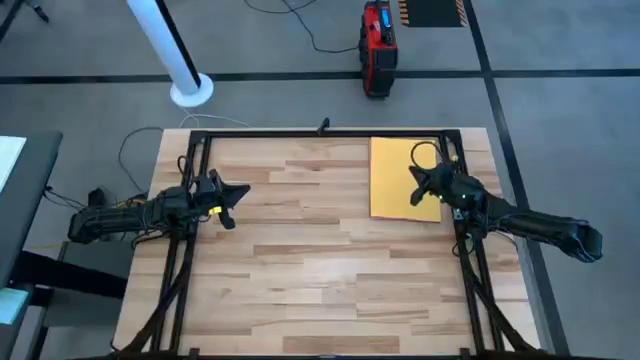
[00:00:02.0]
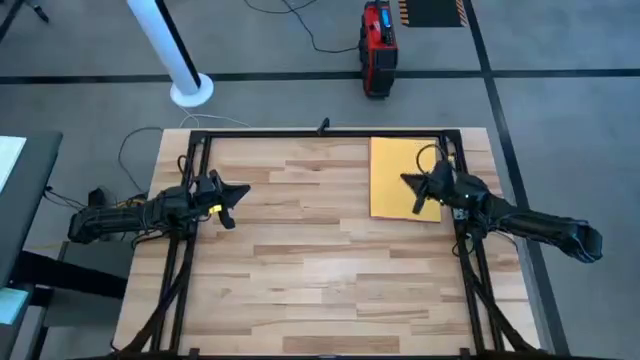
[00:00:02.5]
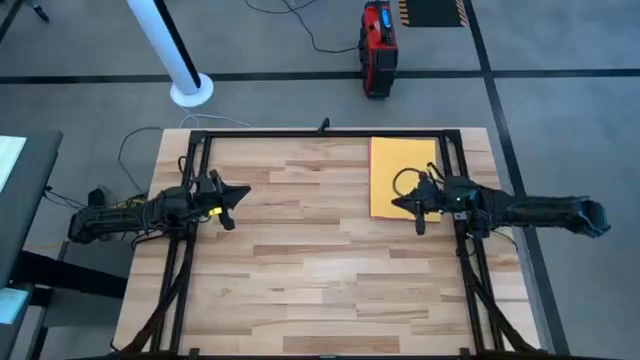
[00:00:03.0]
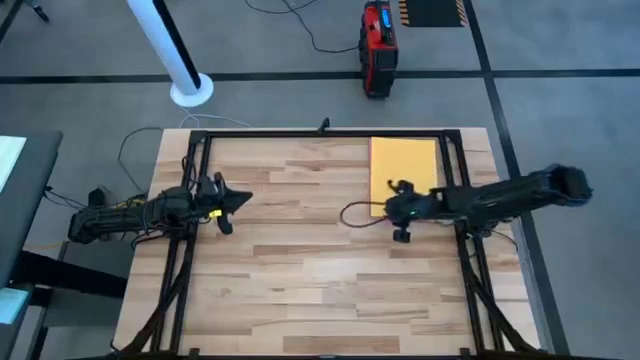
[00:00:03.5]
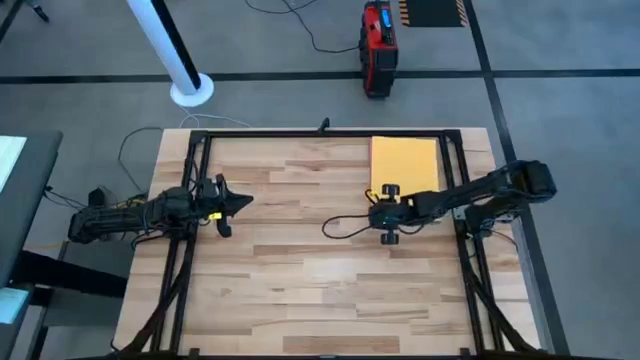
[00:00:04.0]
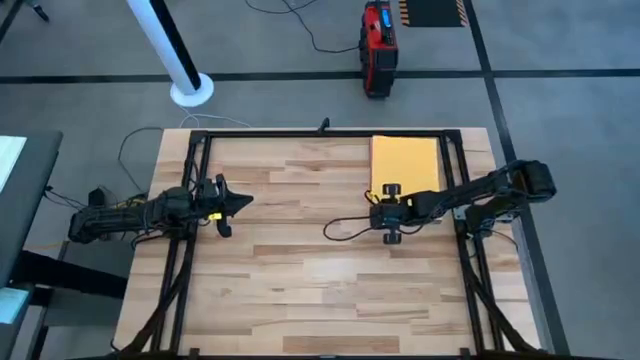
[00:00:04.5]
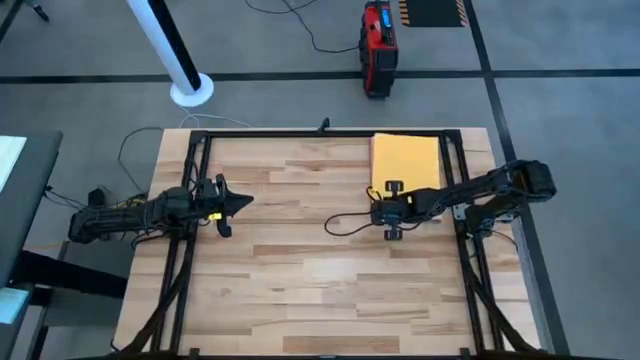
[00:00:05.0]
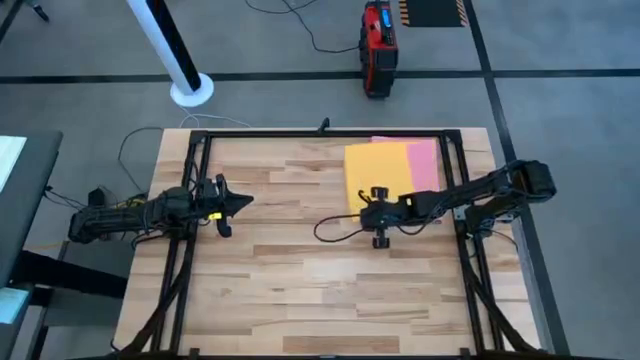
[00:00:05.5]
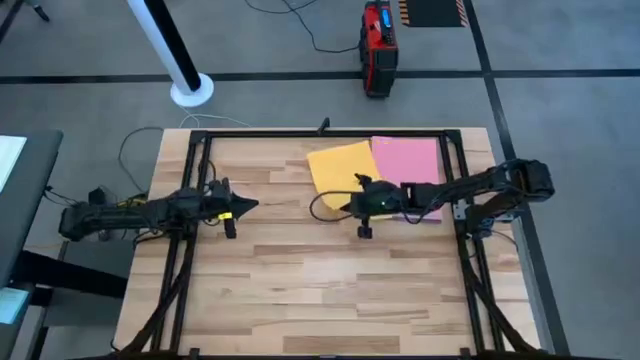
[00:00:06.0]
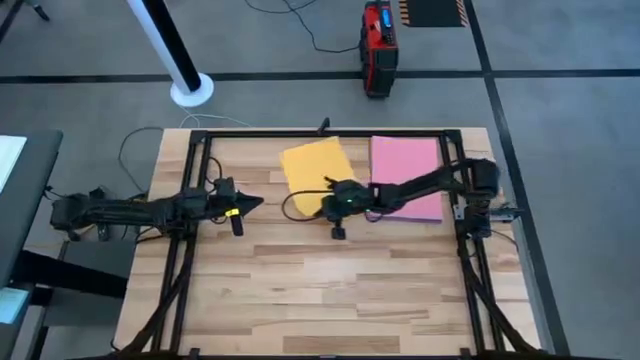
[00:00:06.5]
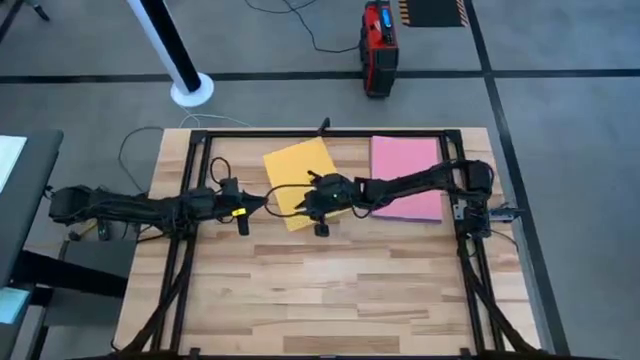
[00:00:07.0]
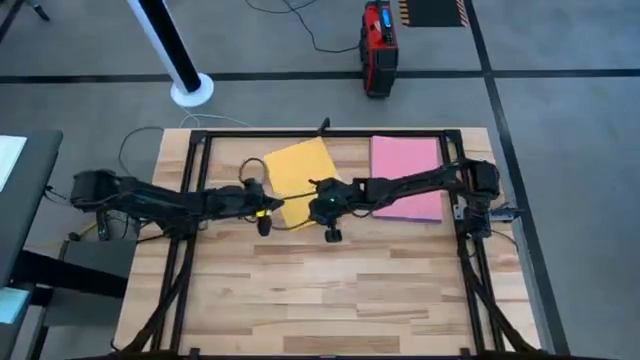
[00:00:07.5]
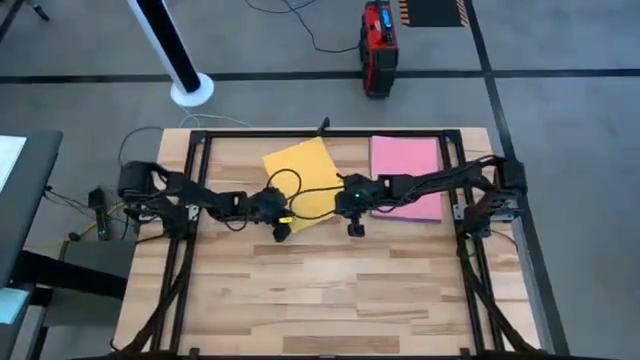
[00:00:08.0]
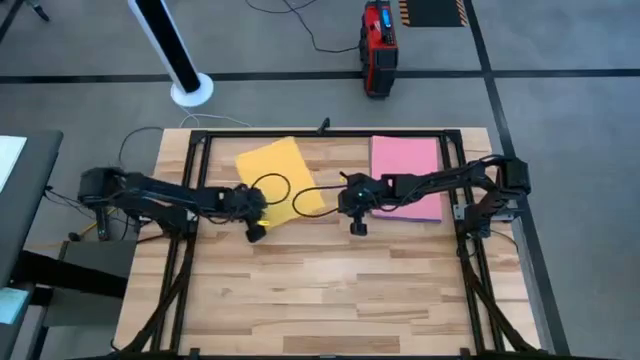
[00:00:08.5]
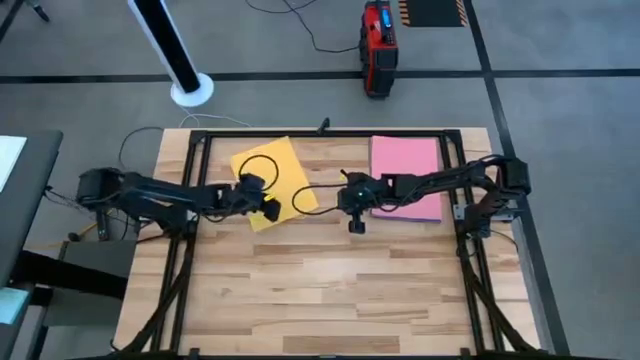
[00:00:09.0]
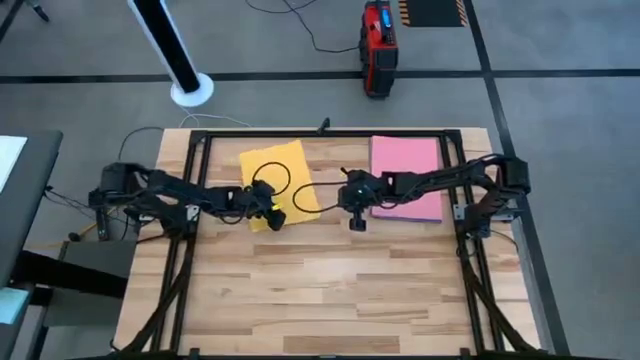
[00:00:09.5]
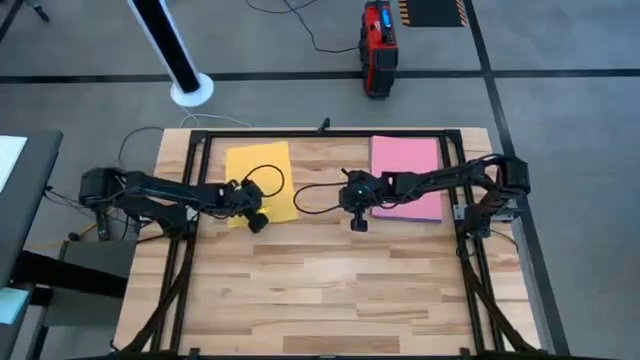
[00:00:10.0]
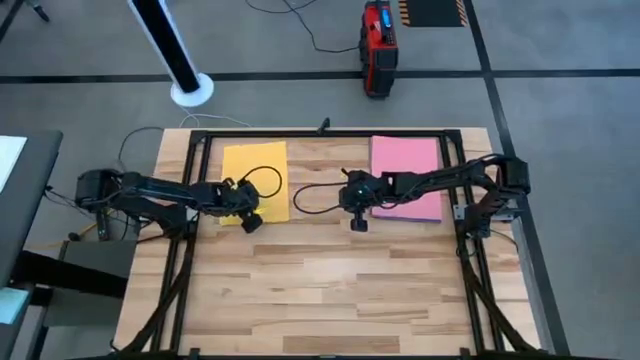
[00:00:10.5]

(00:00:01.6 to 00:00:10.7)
Task: Organize paper
Move the yellow colored paper to the top left of the table

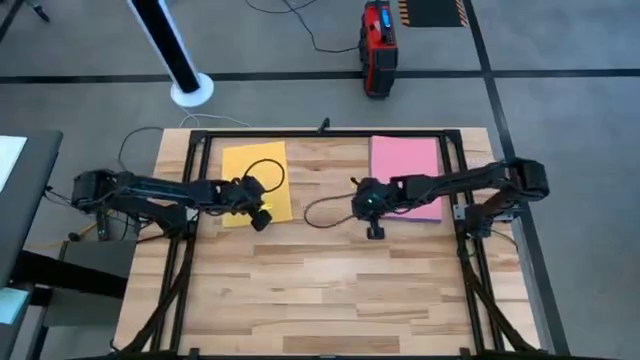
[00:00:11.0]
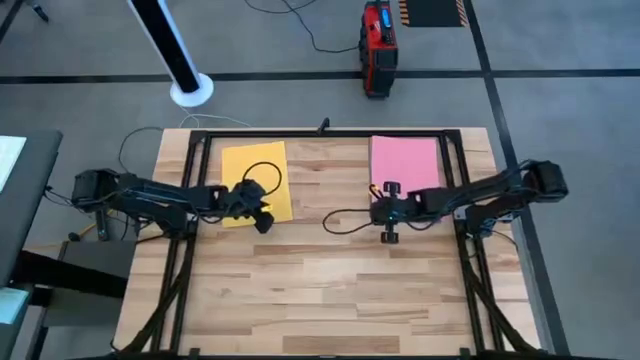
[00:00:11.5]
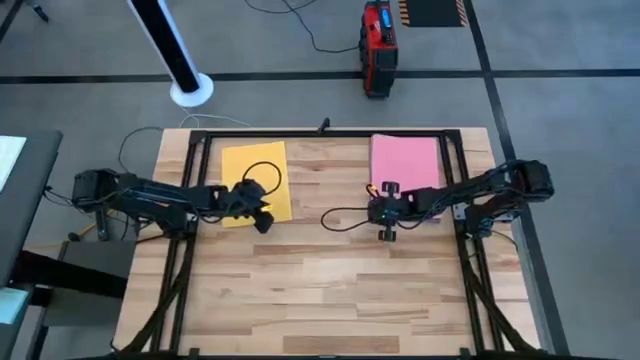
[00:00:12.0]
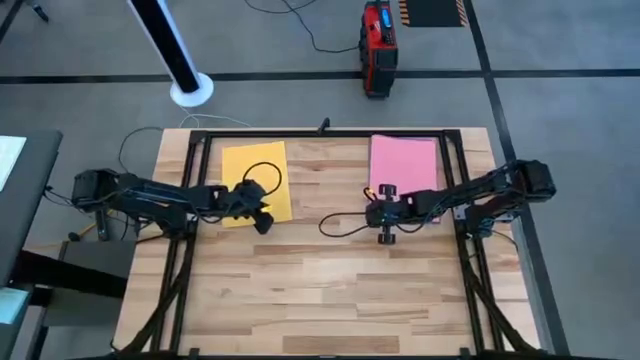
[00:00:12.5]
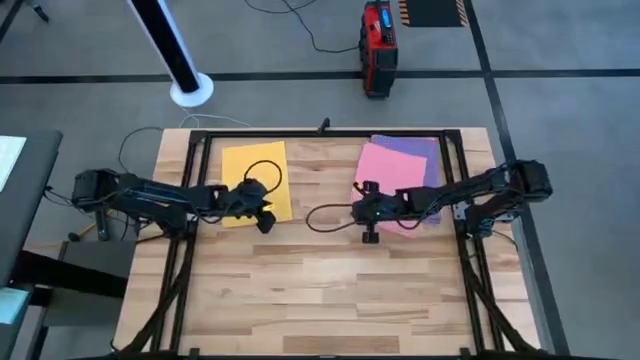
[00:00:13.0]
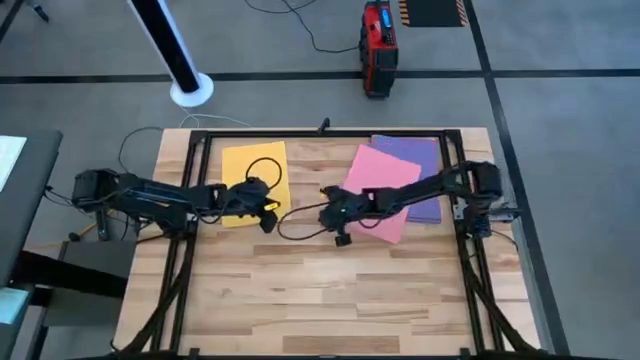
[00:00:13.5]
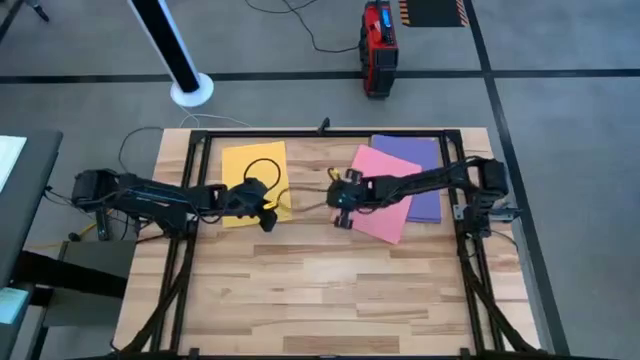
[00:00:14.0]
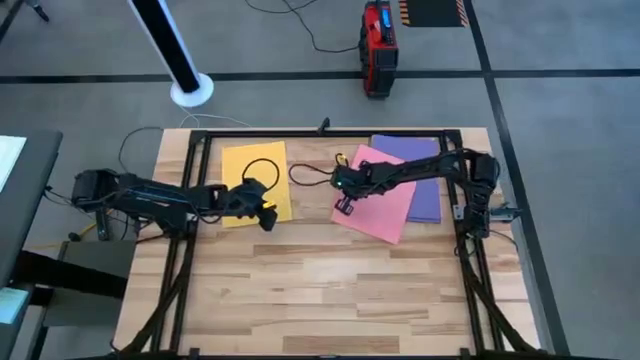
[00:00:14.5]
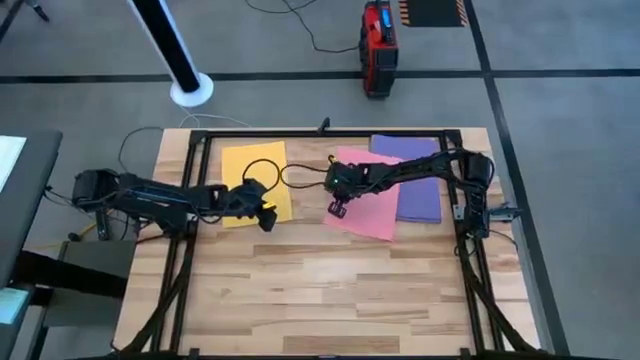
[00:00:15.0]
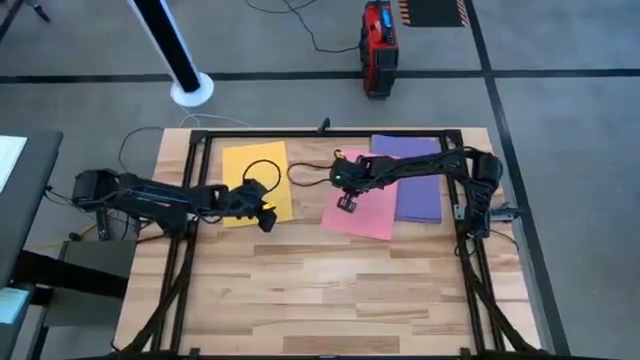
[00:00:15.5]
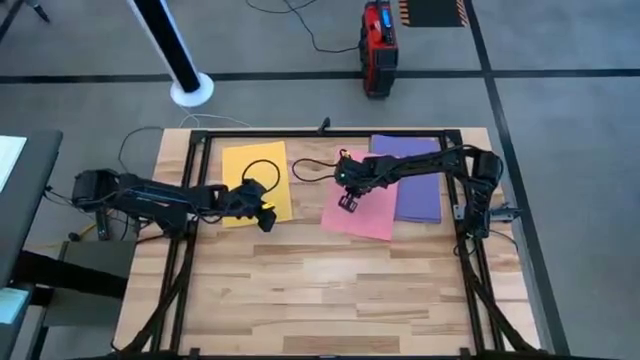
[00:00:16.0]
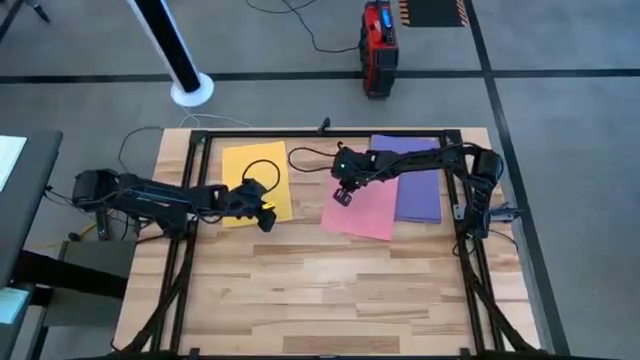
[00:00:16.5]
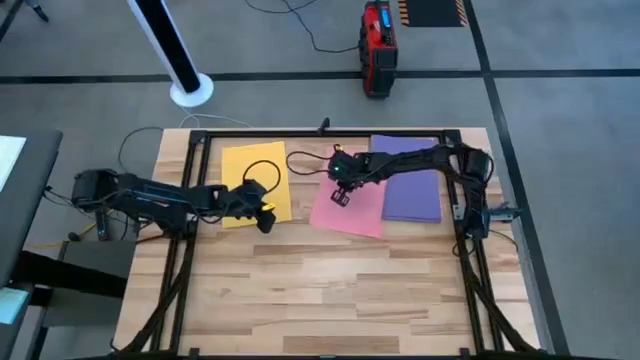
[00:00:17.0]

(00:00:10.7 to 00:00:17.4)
Move the pink colored paper to the top center of the table

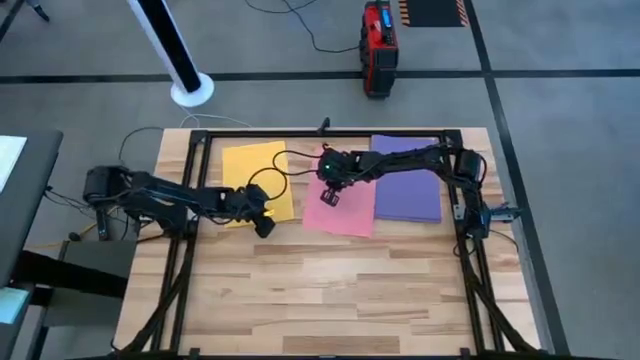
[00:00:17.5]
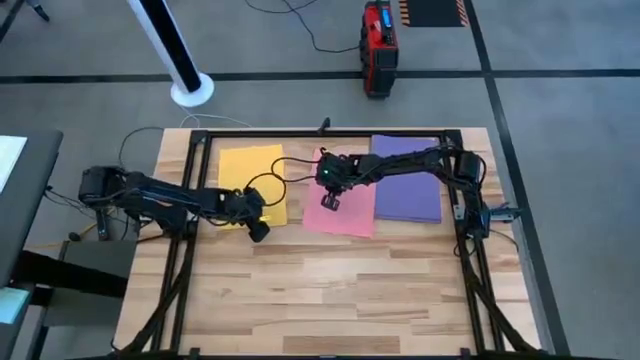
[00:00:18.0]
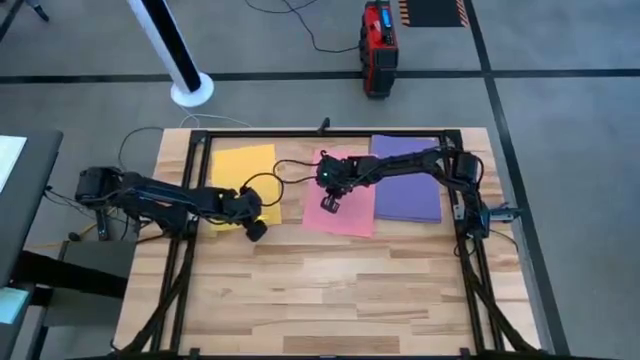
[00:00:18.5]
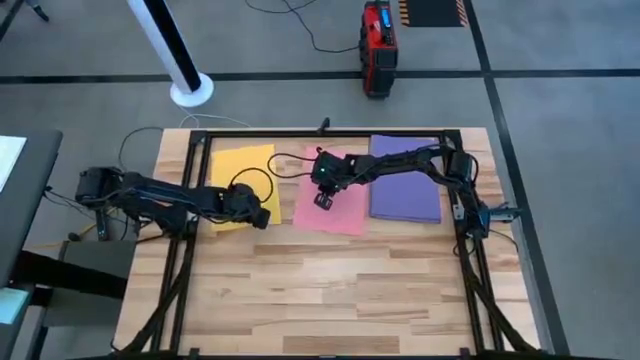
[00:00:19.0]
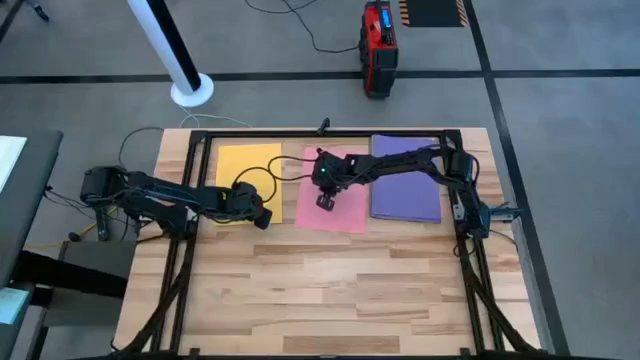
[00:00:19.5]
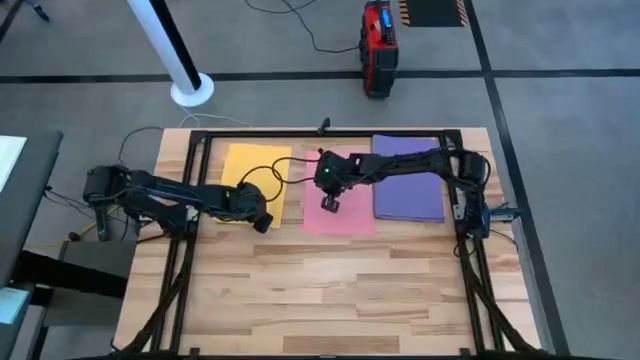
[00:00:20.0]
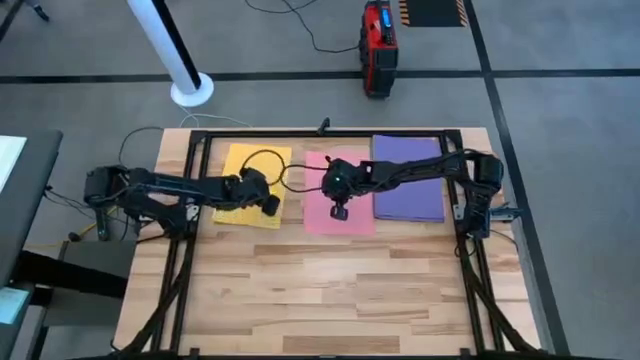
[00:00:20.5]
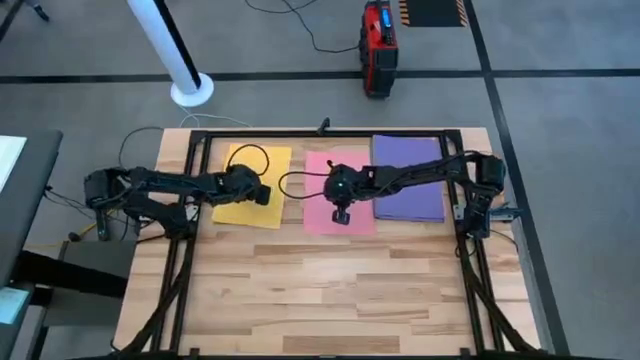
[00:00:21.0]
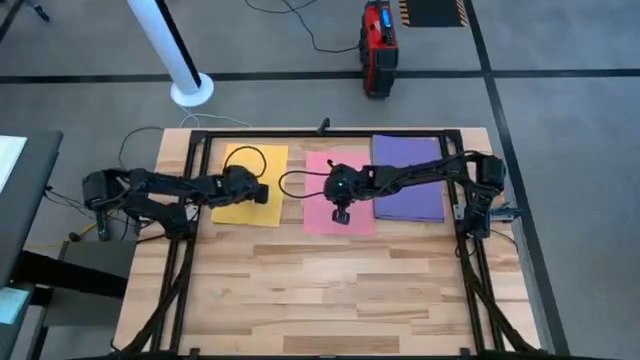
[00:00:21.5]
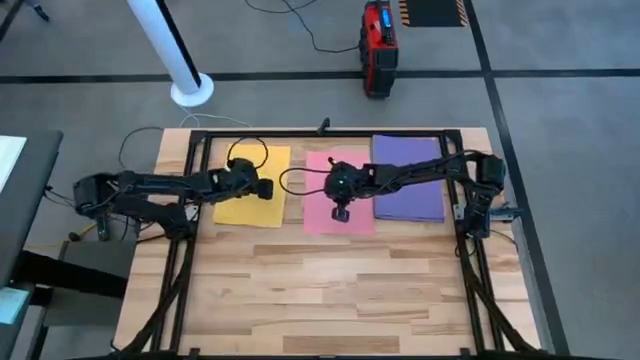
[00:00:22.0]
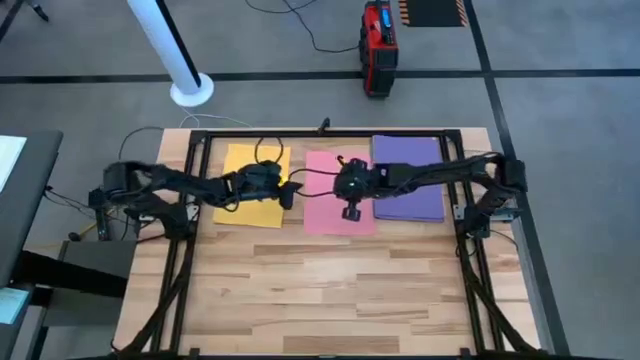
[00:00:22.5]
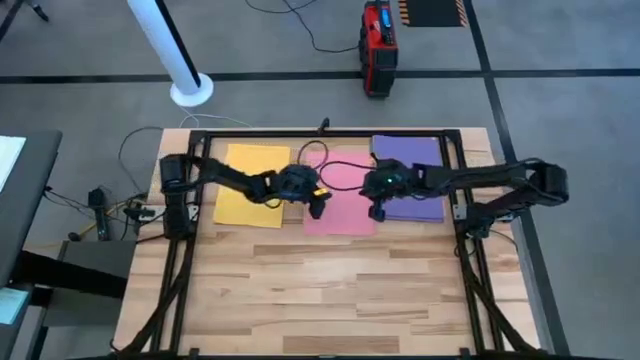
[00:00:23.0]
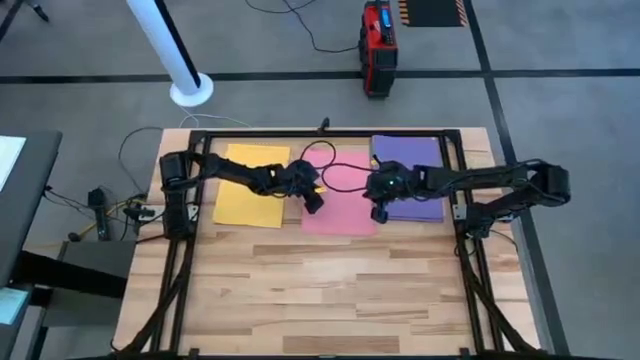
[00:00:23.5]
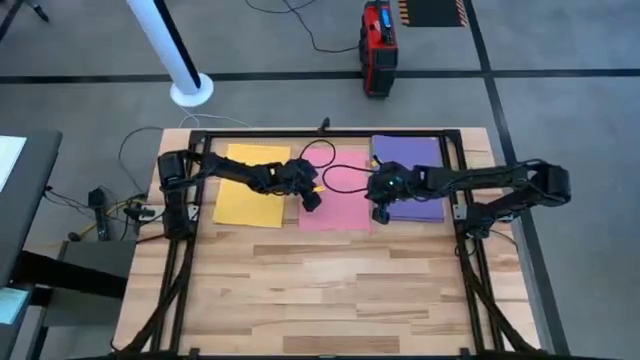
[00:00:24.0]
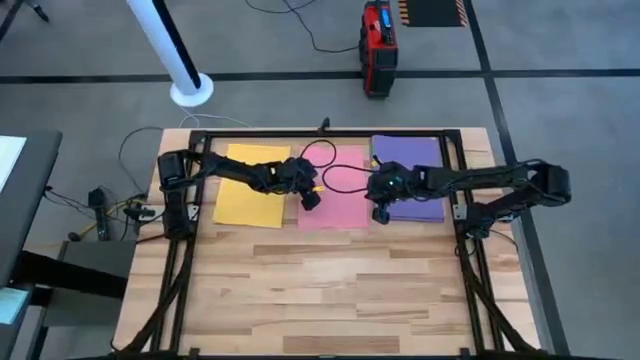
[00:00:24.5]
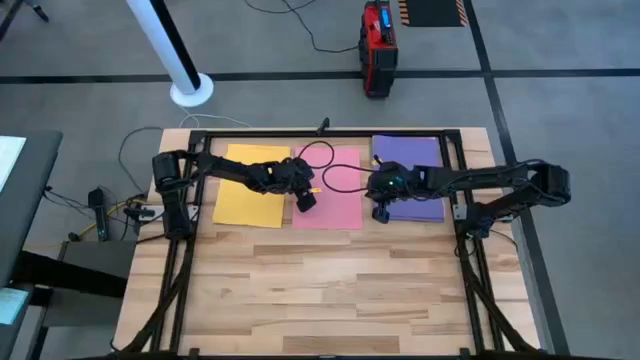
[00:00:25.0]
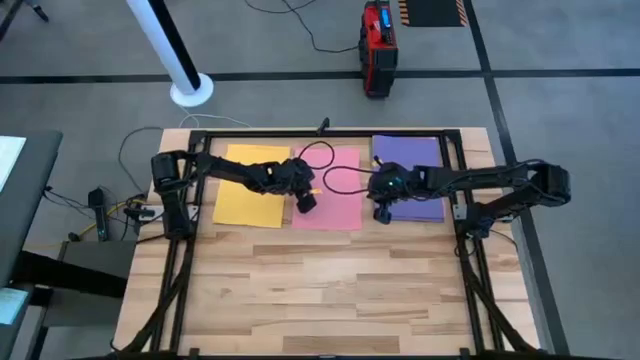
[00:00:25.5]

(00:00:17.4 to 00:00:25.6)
Adjust the yellow and pink colored paper
